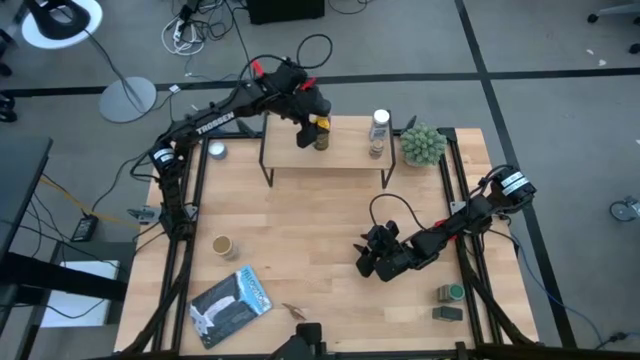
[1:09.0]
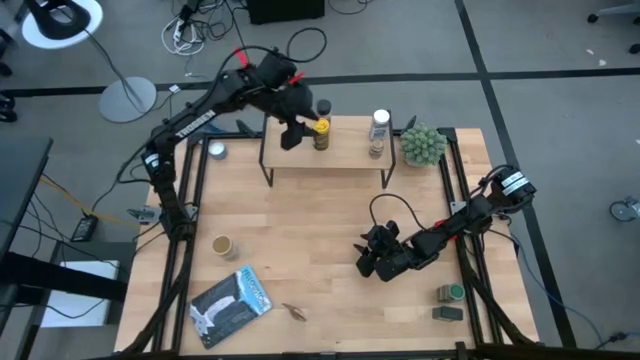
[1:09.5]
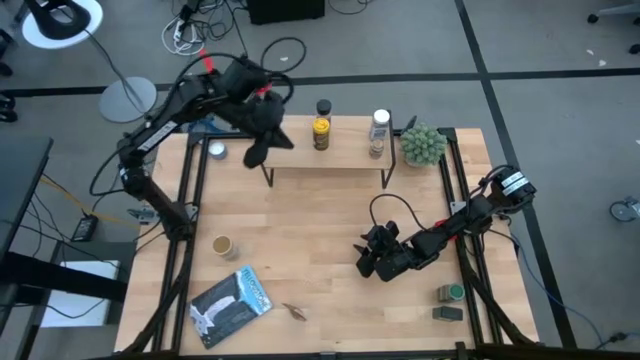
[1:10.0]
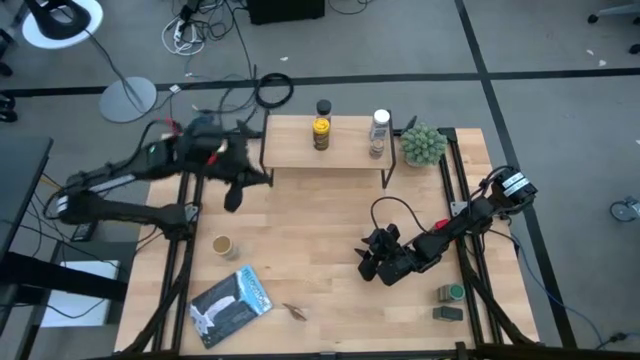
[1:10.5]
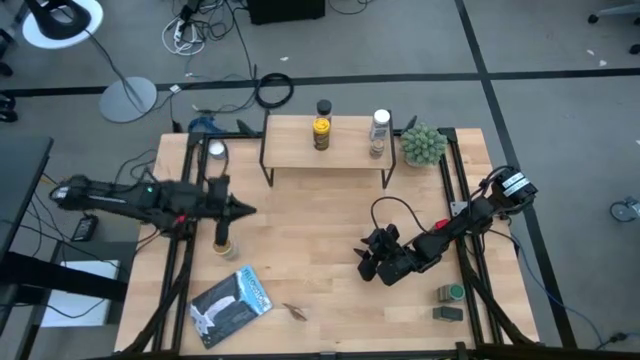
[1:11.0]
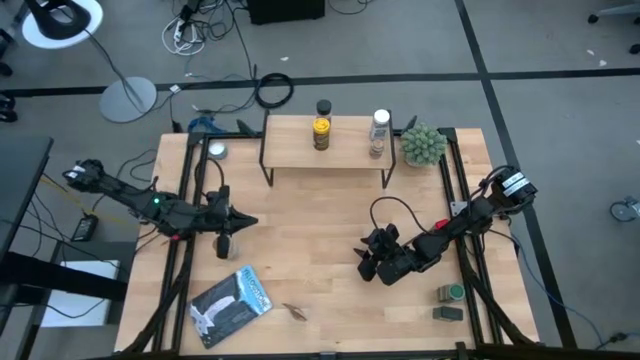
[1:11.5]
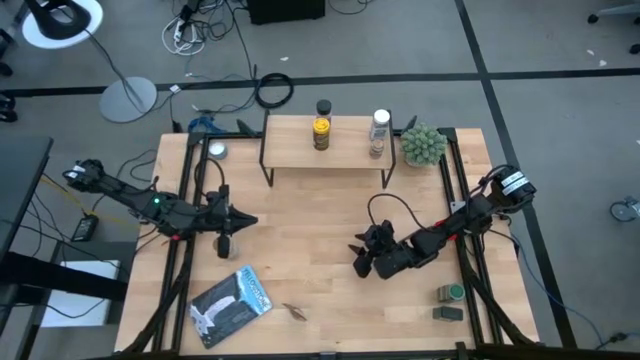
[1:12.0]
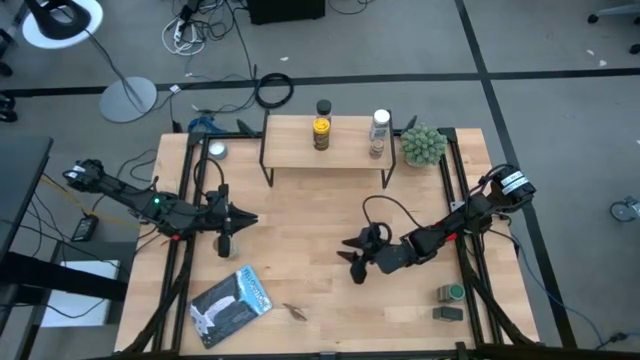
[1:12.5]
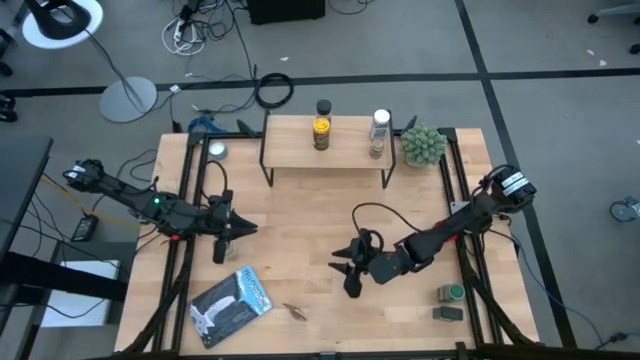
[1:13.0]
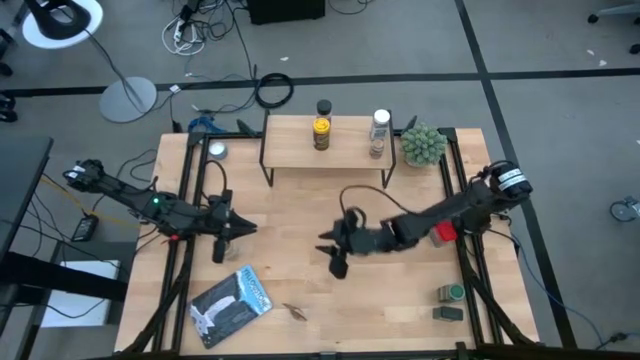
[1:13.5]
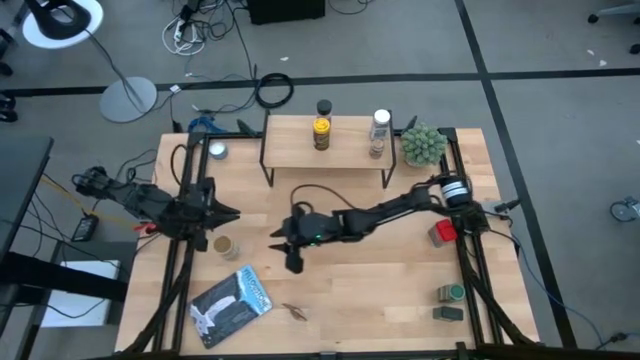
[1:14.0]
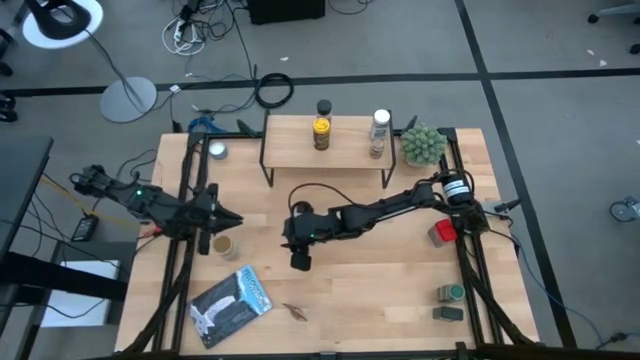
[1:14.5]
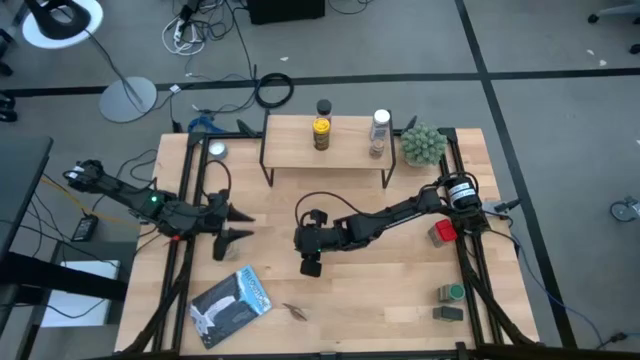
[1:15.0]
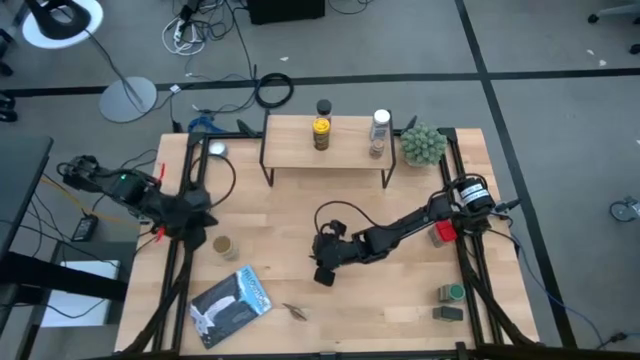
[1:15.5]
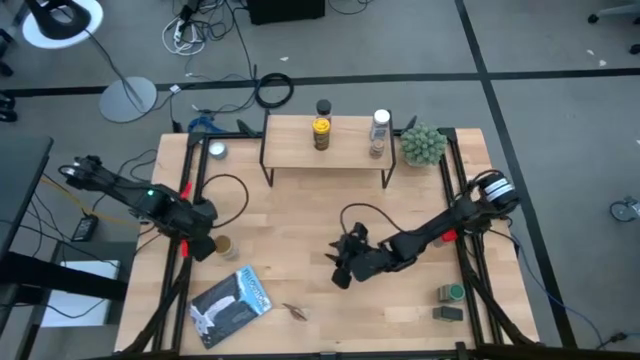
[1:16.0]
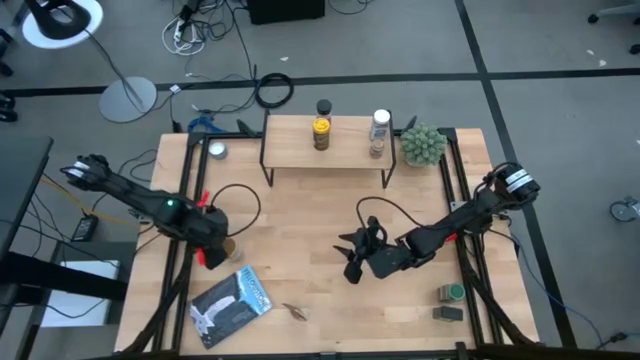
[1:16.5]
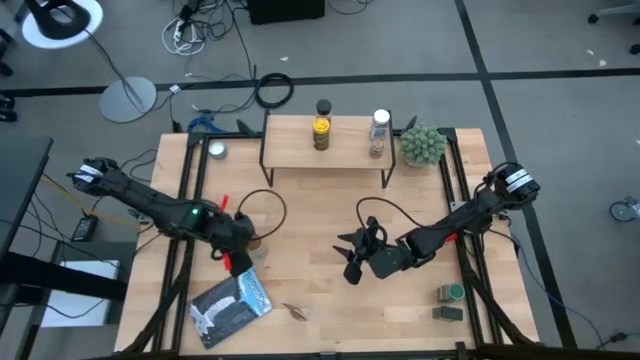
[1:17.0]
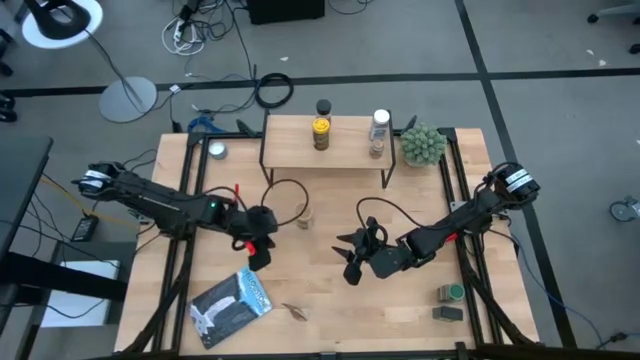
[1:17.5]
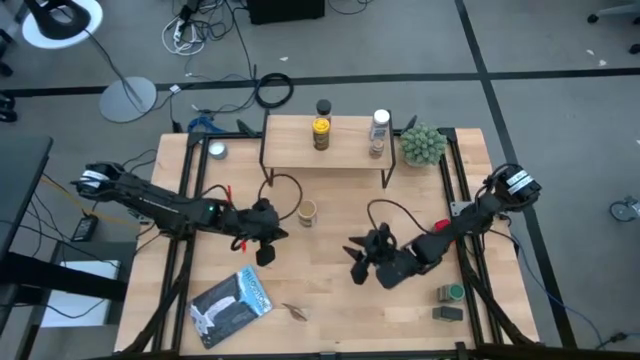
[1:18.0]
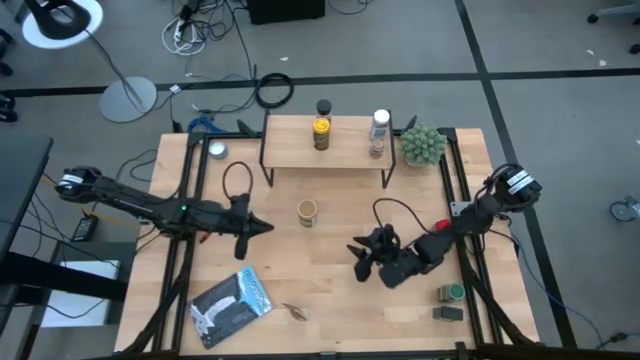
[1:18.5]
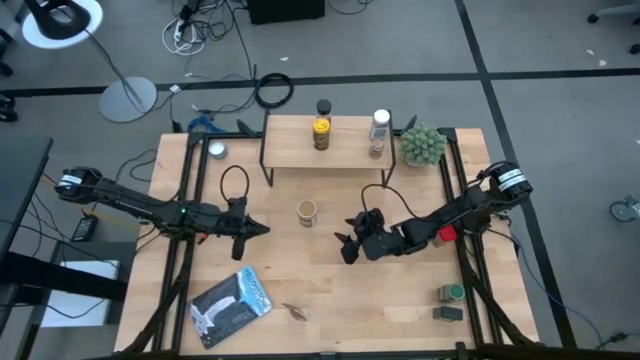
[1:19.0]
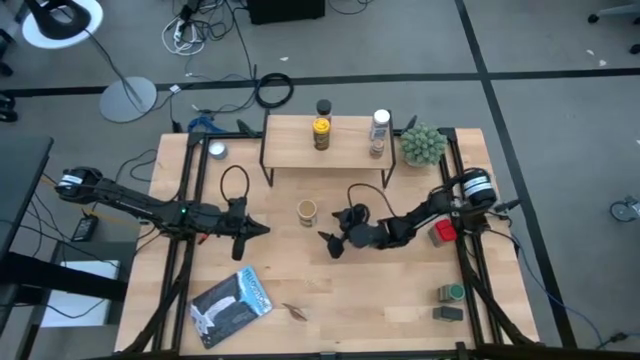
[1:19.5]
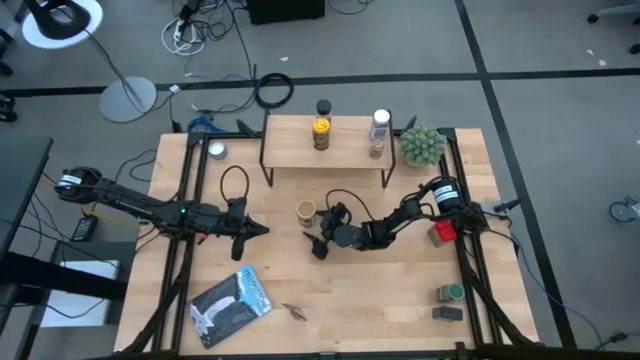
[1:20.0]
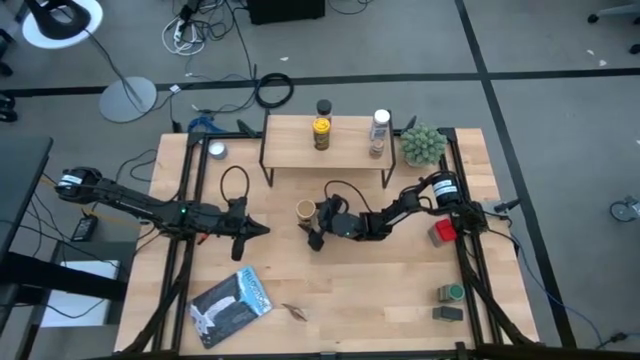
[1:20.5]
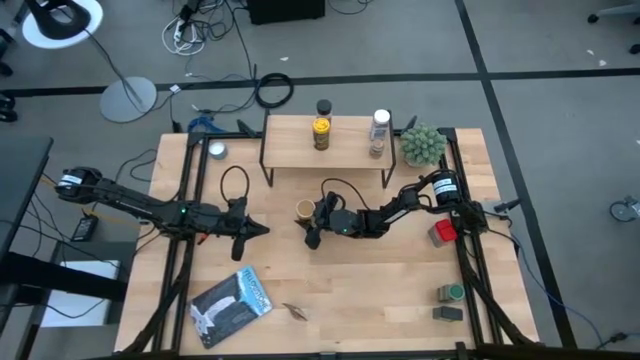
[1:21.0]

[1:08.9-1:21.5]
Task: Shelf spices
Put the brown seasoning bottle on the shelf

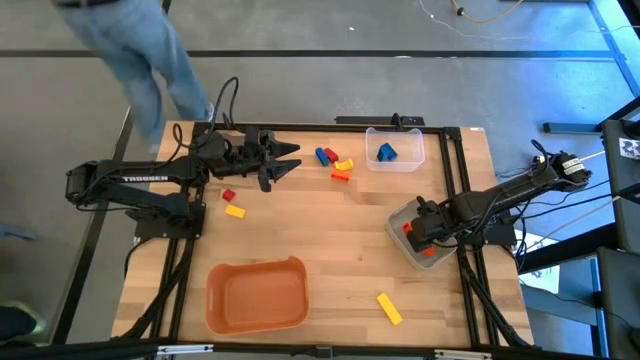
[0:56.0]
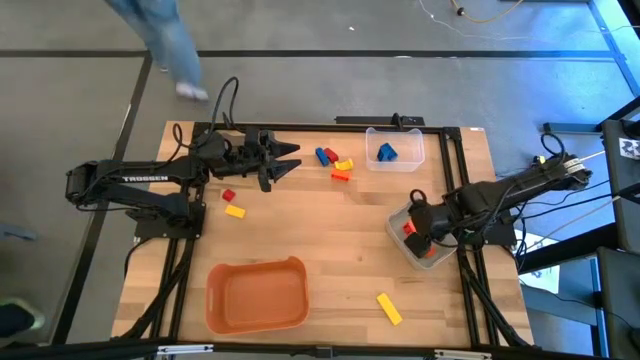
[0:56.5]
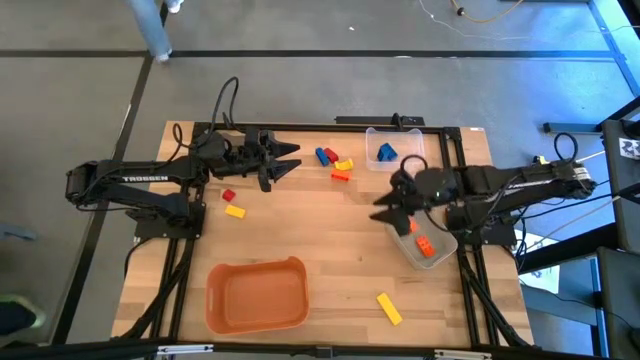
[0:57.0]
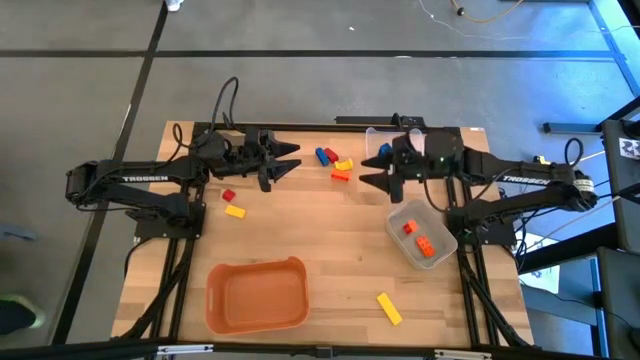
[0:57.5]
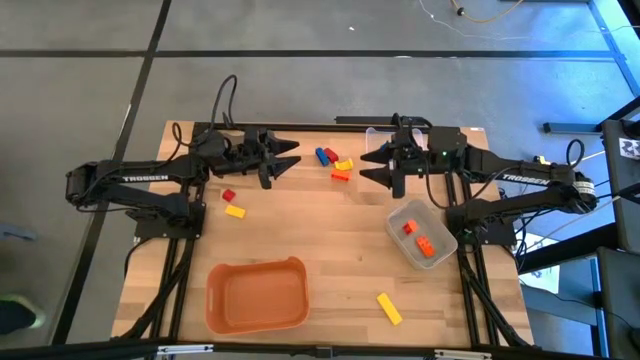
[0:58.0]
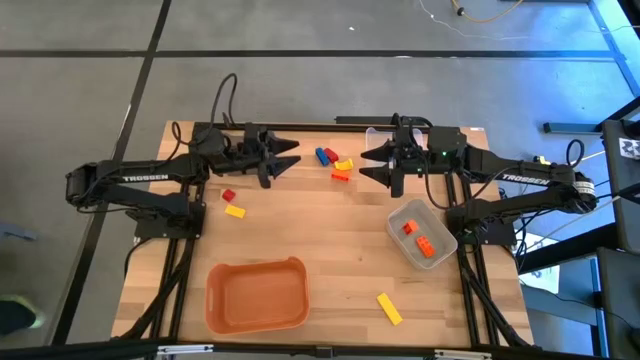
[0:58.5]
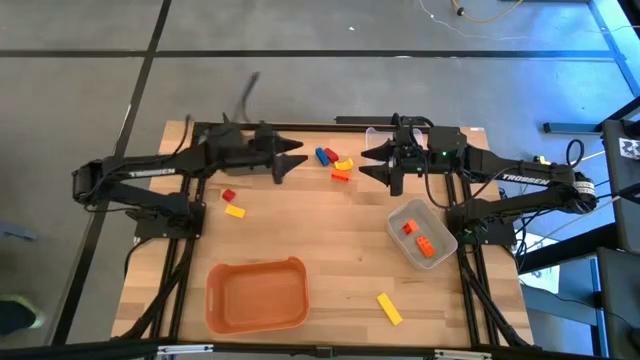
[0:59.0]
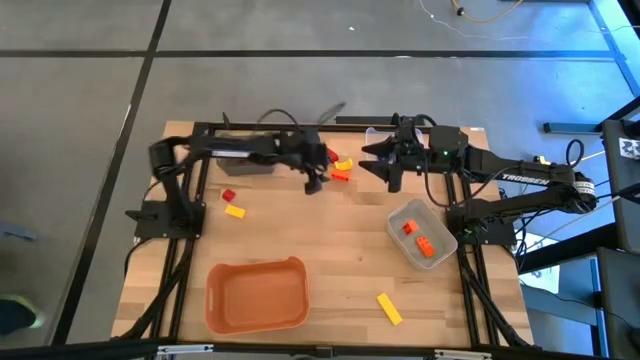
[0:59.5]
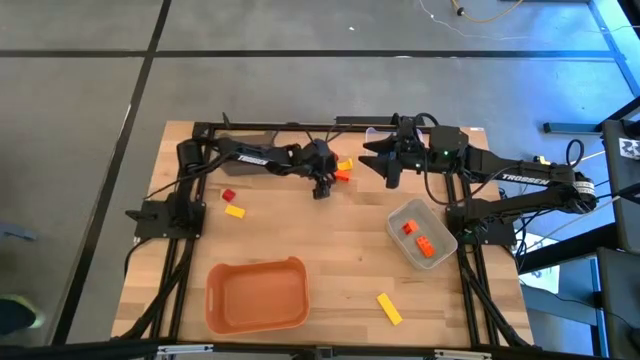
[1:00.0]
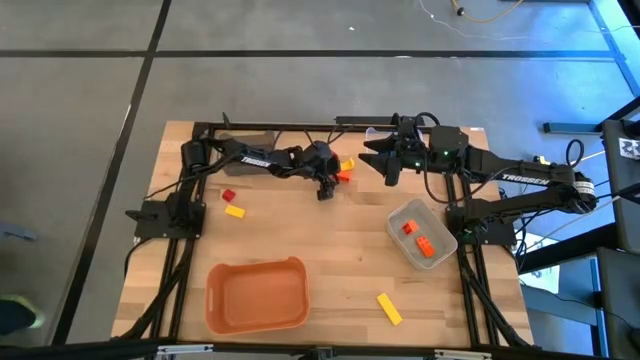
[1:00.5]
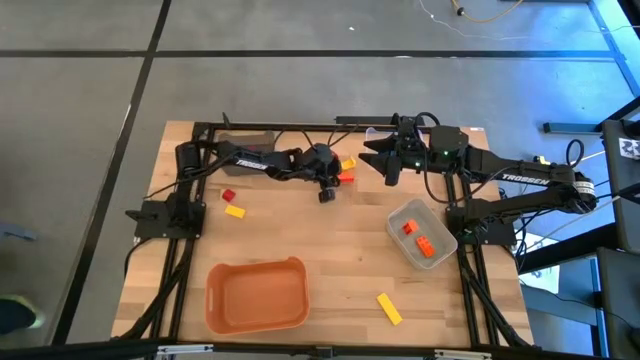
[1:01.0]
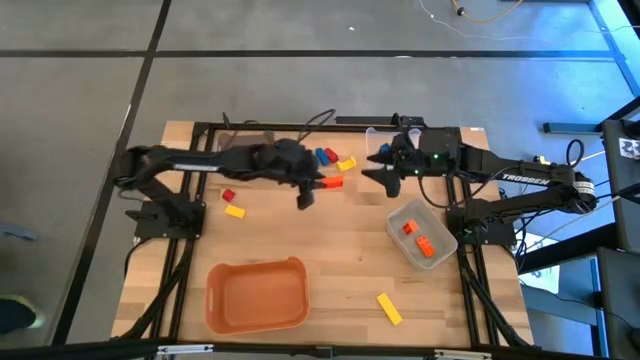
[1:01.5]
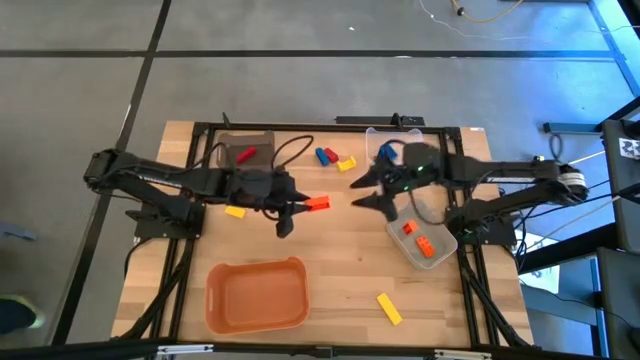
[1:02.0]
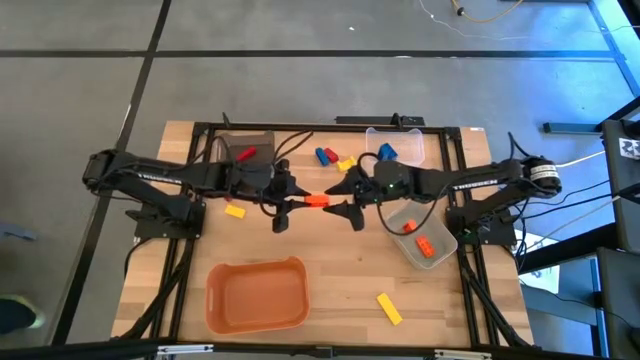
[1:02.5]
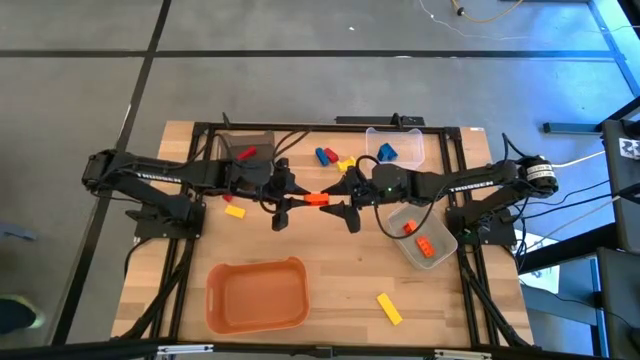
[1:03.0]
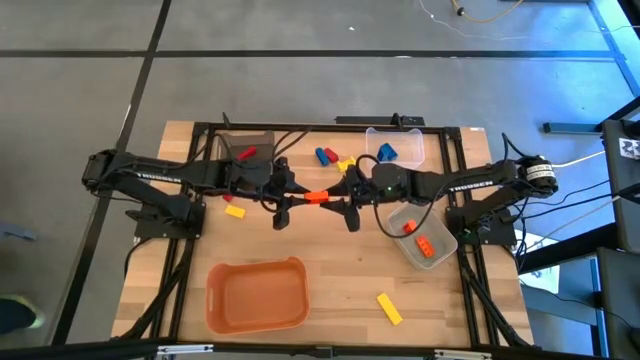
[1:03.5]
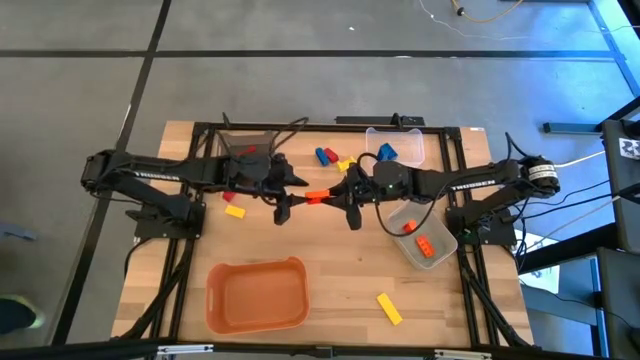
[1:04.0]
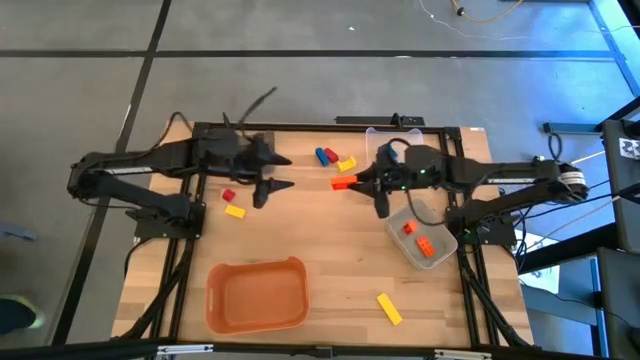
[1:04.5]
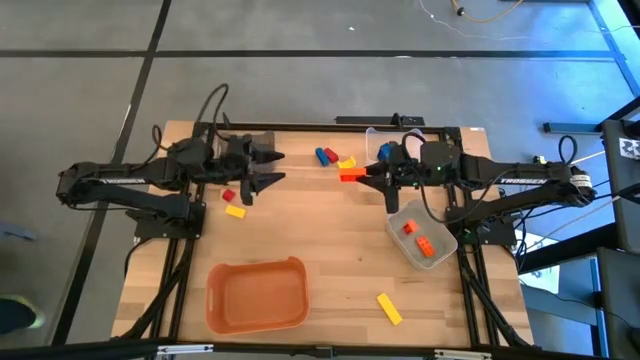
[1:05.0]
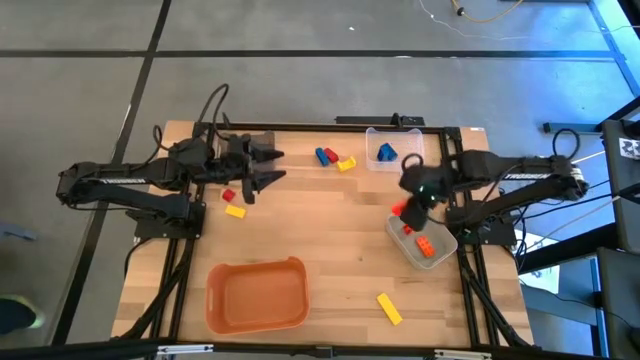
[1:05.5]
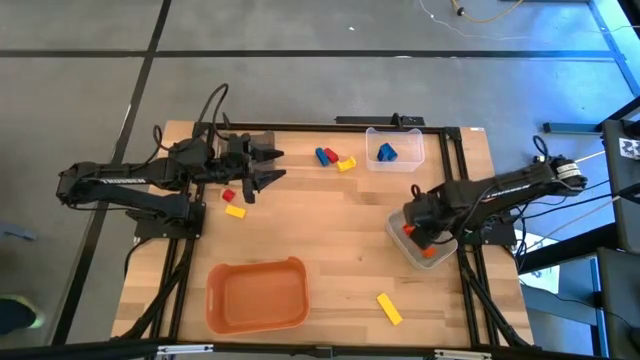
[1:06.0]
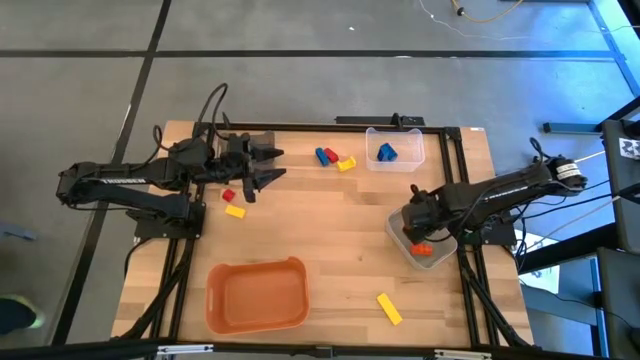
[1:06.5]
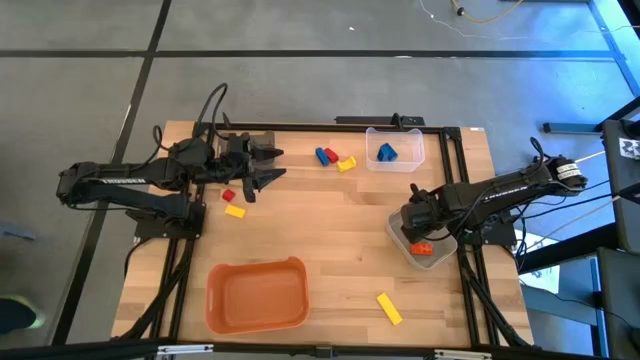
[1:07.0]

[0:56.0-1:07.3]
Task: Sort & place blocks by color
Put the orange game piece into the gray bin
